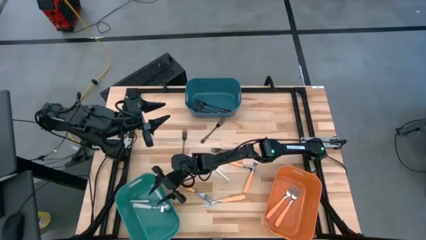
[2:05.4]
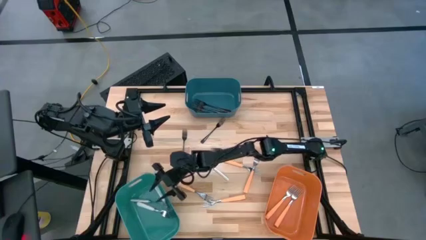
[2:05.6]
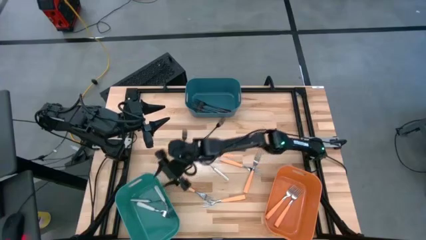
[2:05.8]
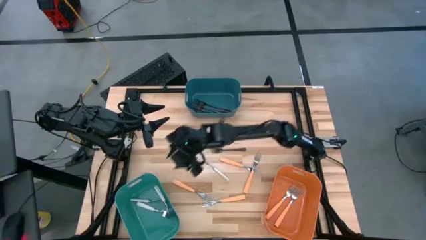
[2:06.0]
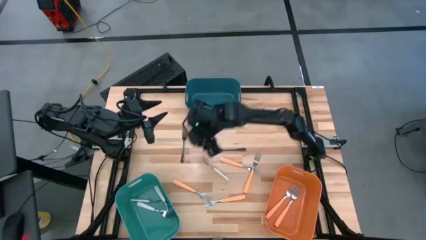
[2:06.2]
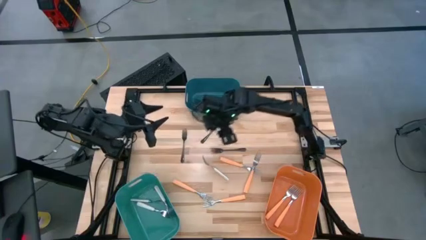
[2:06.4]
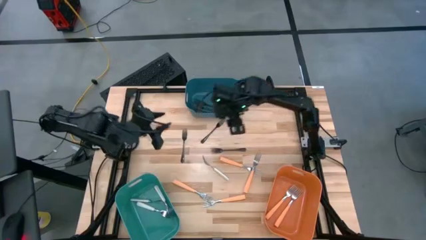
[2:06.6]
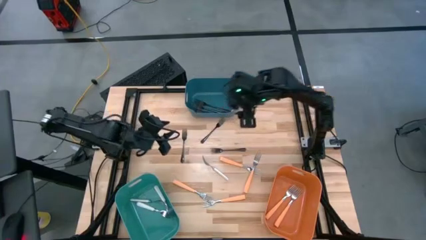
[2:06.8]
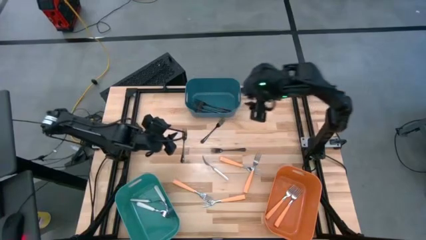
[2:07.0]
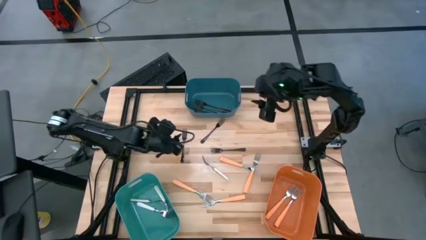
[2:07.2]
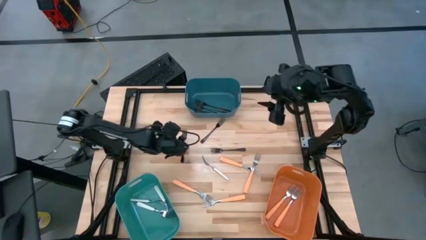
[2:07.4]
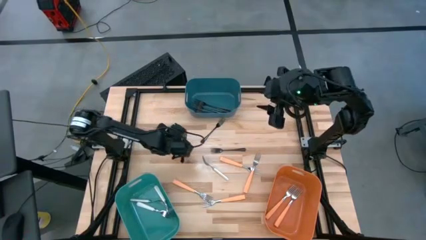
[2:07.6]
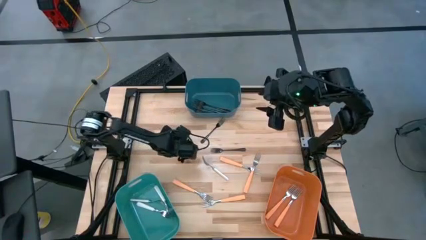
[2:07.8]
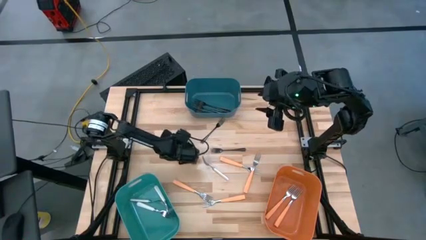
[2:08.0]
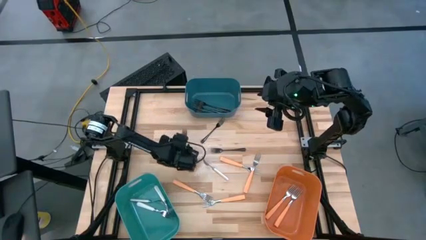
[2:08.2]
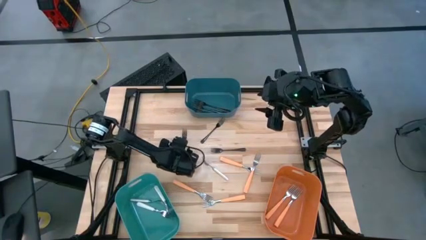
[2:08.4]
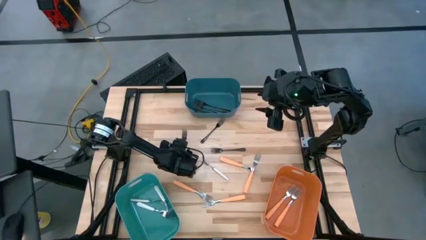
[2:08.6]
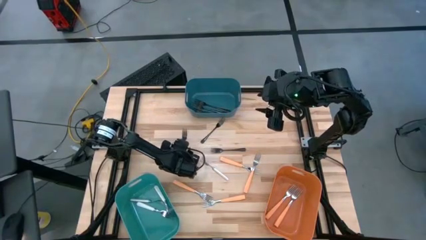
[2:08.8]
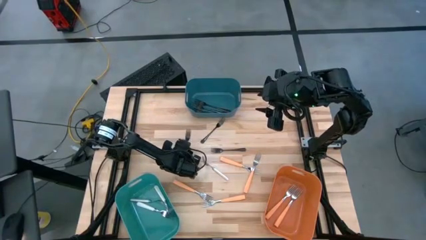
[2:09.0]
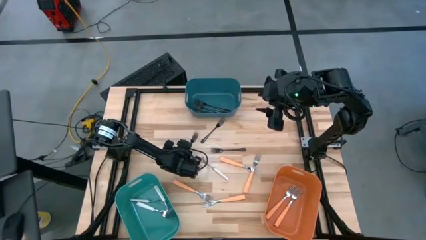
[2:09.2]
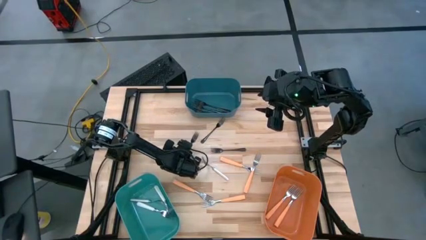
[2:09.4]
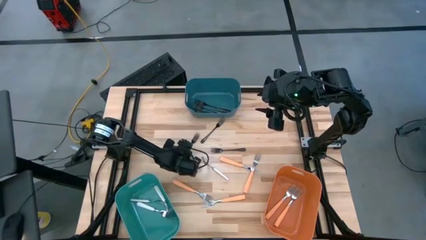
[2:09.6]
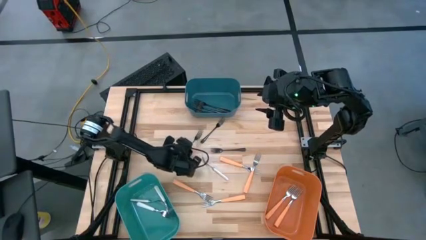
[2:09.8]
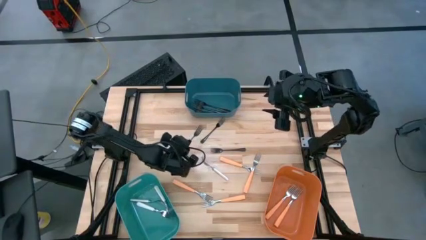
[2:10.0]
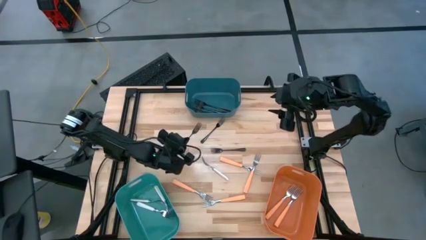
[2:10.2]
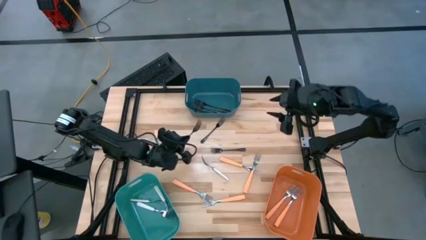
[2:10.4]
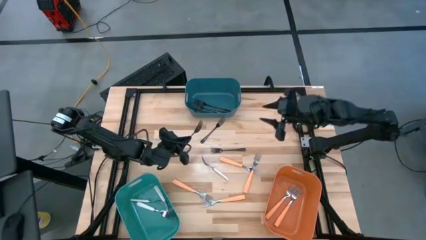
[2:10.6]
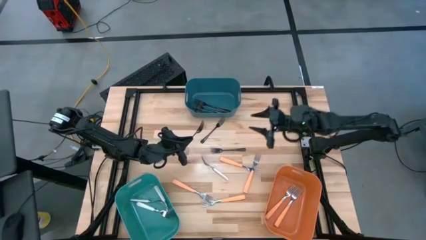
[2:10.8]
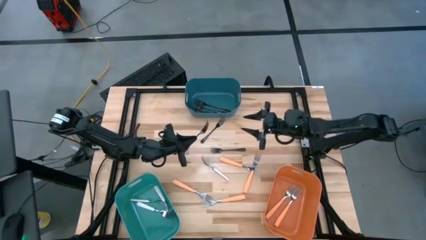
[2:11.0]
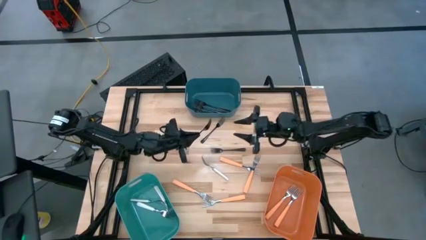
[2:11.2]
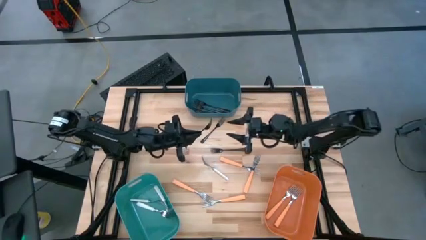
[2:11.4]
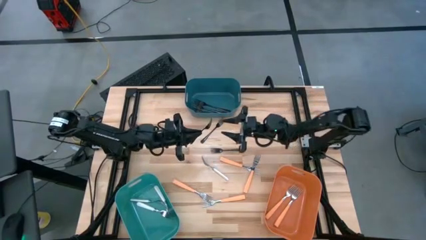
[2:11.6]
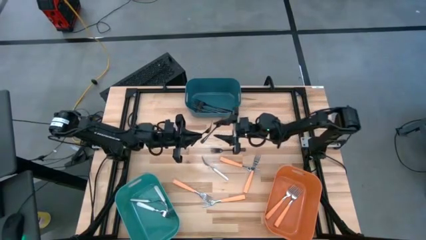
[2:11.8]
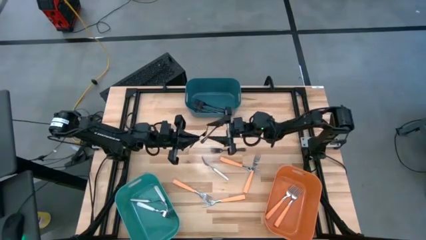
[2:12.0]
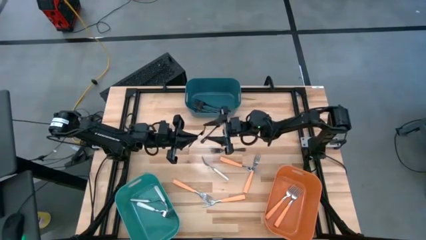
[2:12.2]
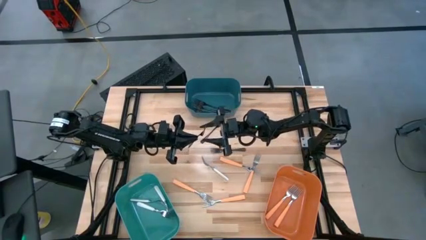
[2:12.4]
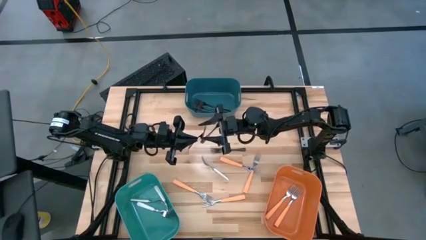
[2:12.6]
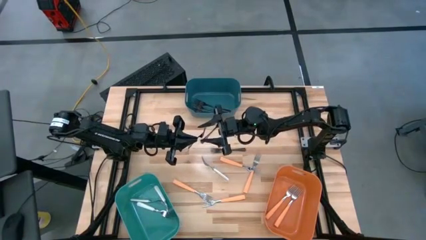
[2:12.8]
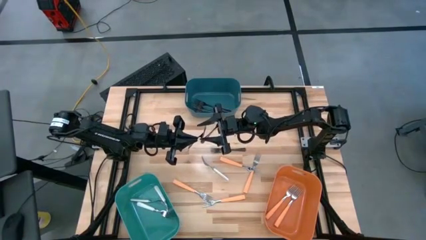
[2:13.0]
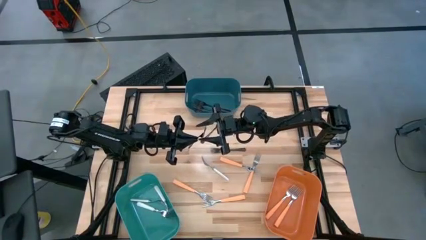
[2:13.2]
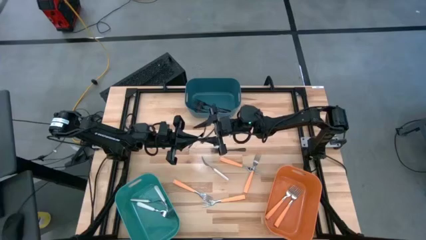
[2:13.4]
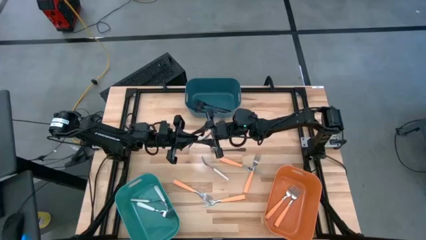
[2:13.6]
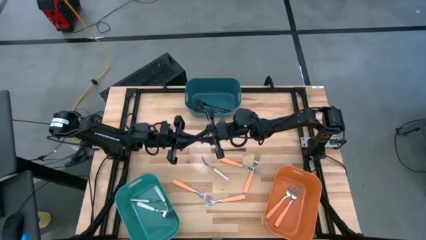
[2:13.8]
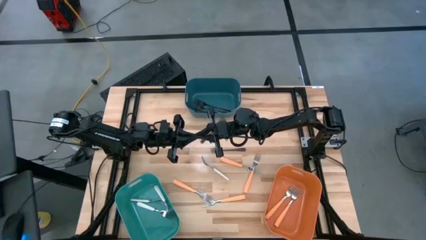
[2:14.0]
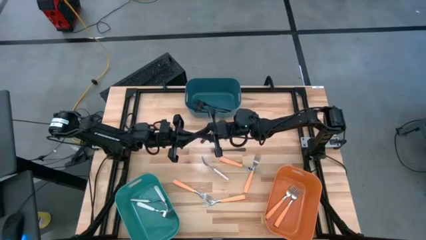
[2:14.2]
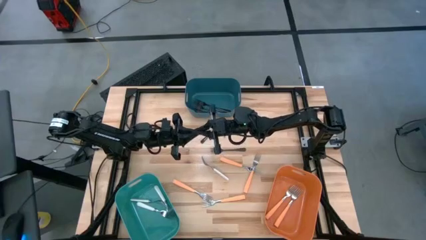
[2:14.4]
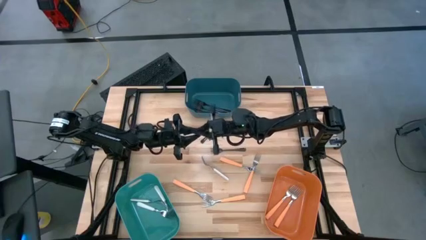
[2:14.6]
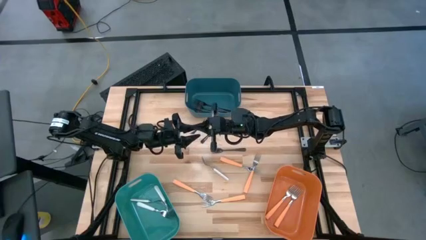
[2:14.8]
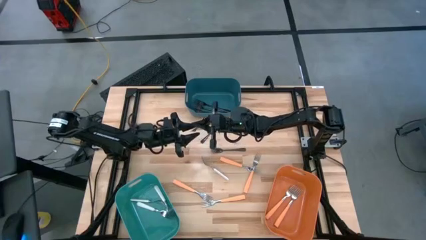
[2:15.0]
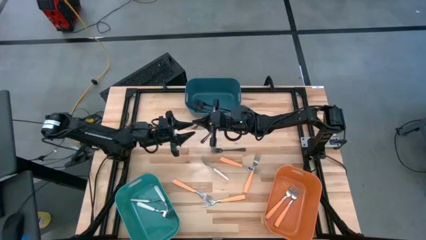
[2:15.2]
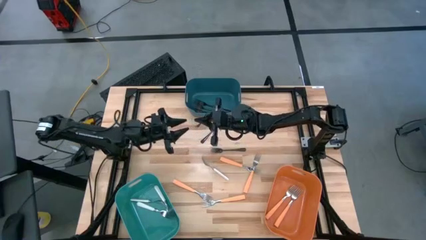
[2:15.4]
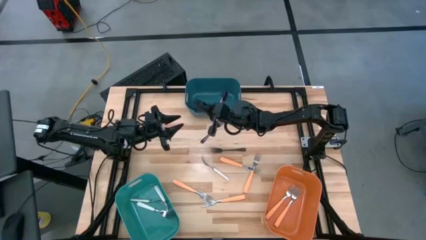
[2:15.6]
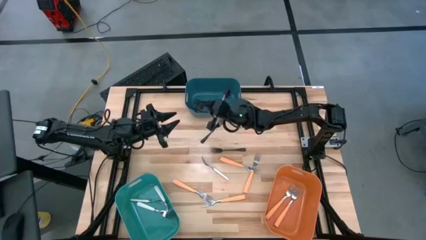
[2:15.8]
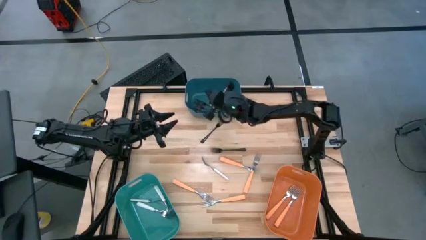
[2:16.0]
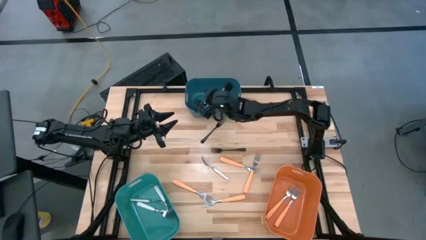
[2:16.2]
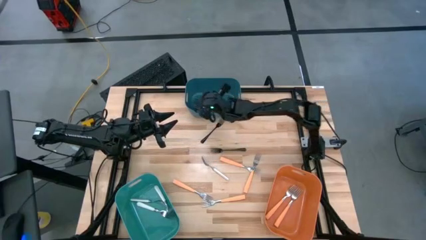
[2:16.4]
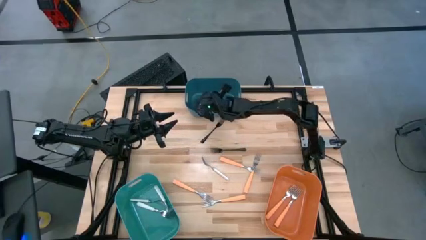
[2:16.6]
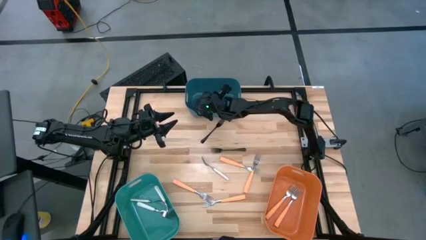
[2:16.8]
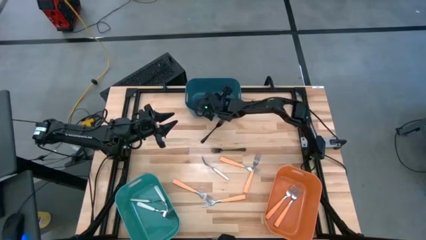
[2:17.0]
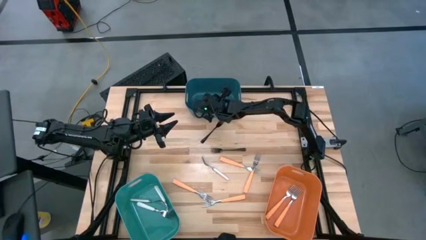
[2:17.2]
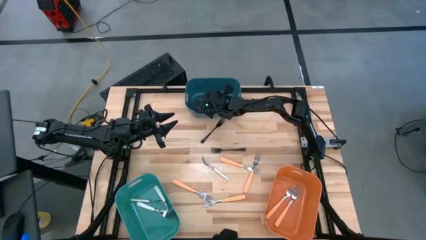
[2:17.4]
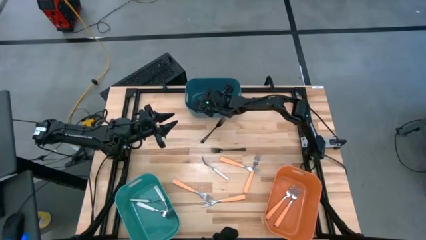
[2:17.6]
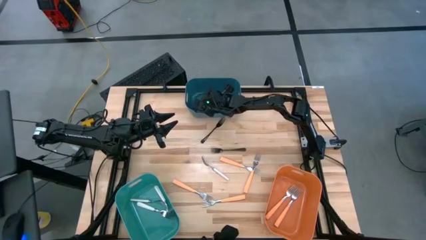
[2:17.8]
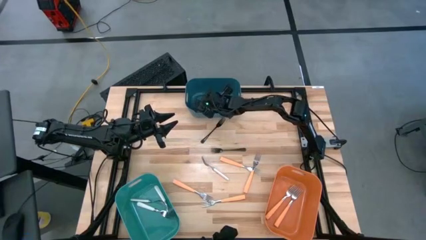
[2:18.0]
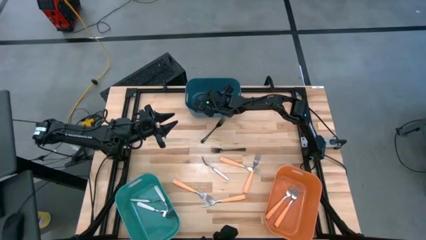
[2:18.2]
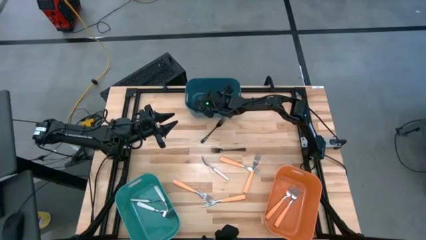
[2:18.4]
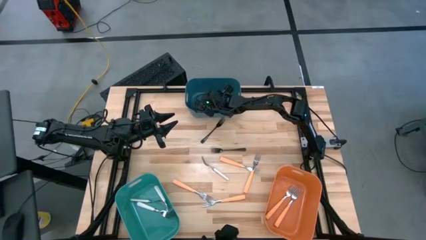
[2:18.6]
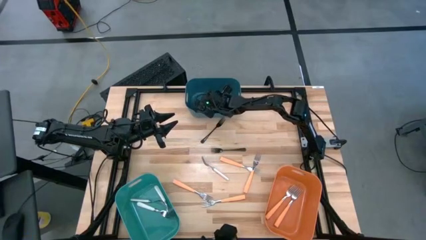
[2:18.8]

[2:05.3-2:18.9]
Task: Sort silverware by color (type)
Put the black fork into the blue bin
